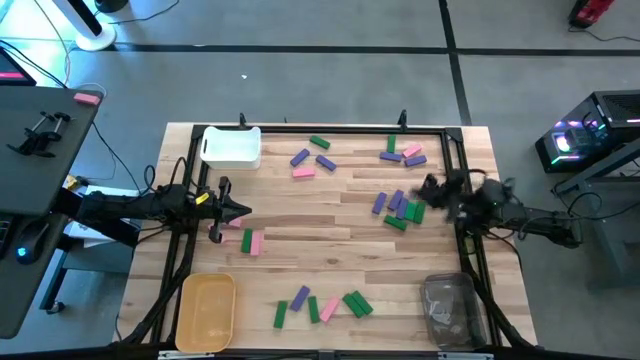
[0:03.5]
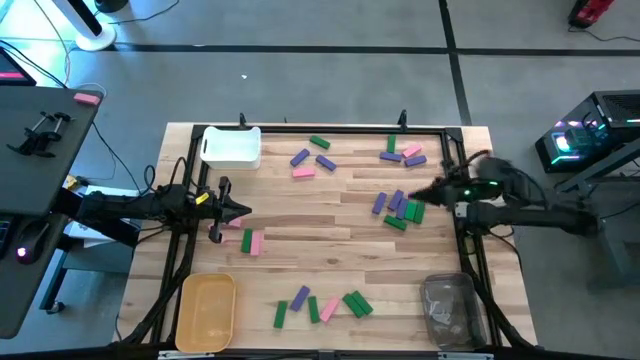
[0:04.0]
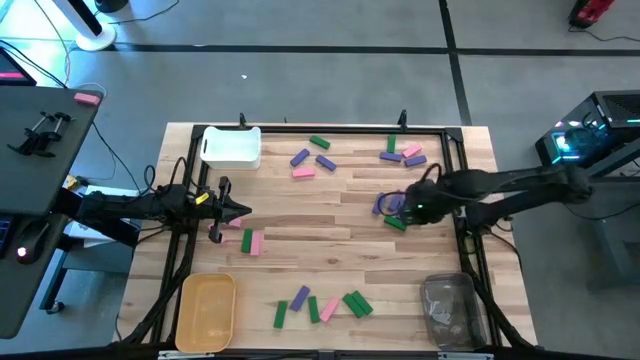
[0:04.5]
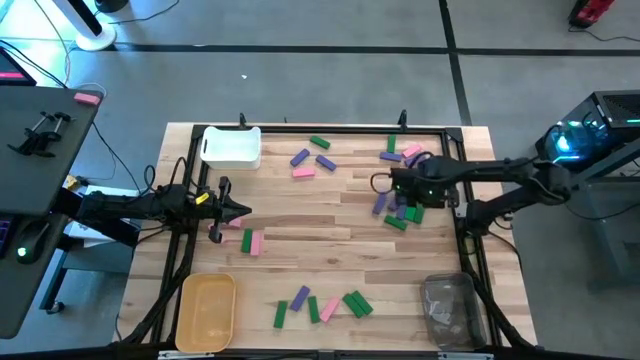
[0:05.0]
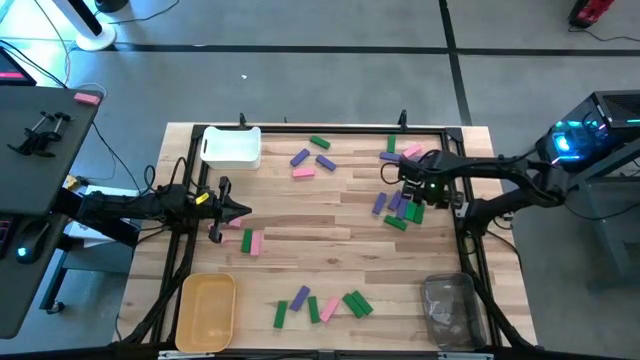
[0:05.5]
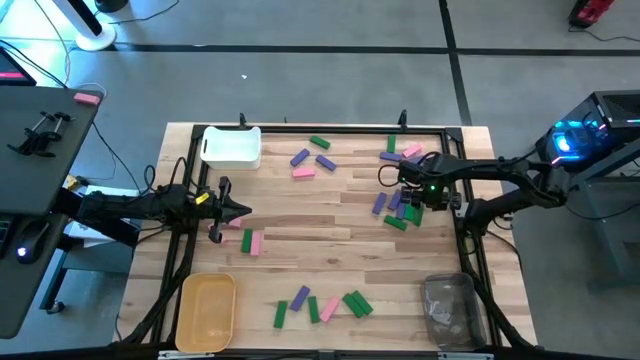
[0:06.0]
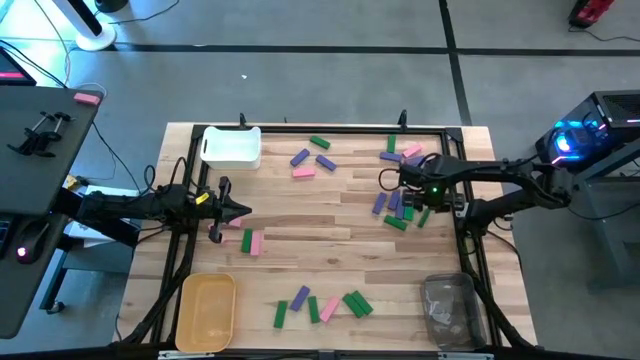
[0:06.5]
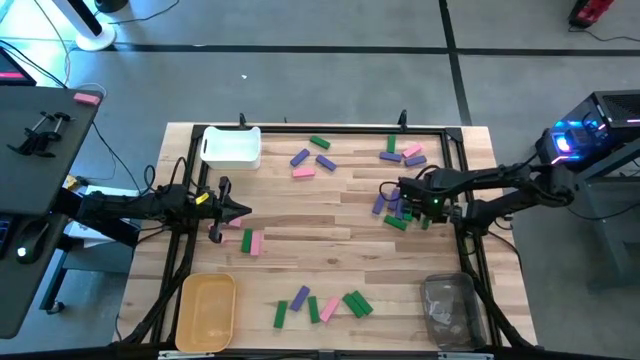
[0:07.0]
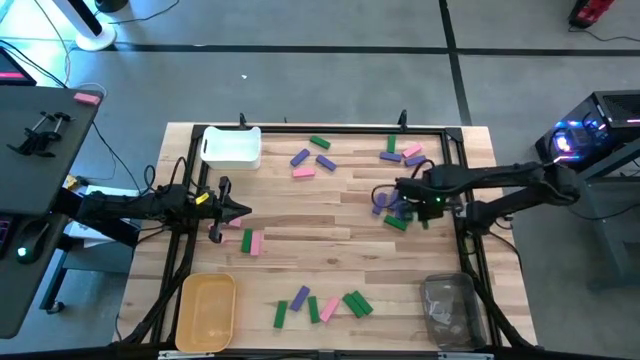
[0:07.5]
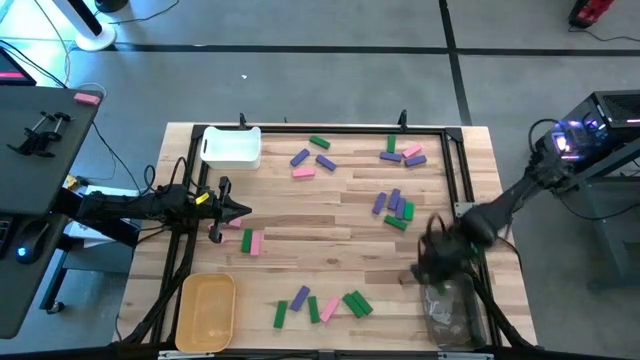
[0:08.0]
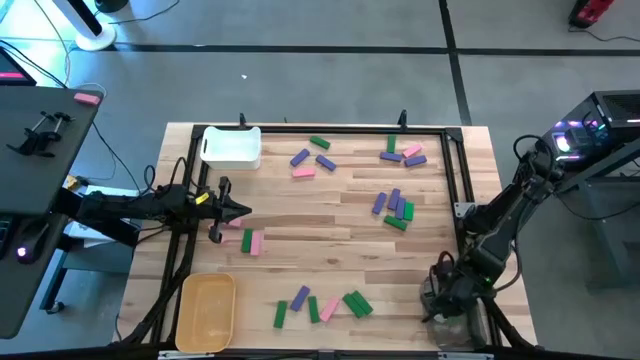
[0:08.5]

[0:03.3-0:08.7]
Task: Sort blocks
Put the green wooden block into the black bin

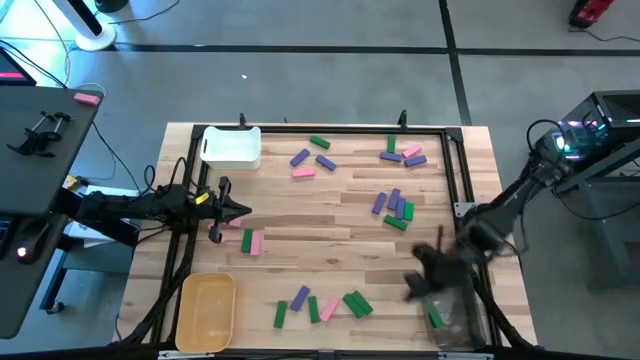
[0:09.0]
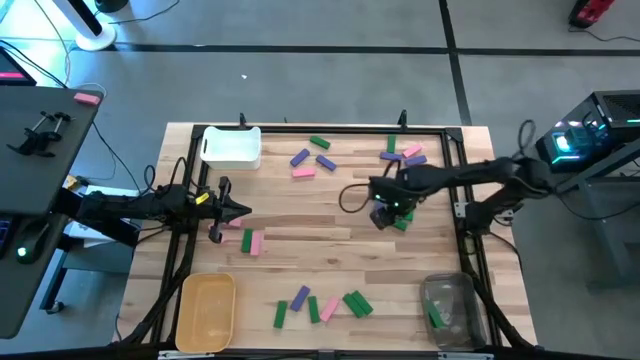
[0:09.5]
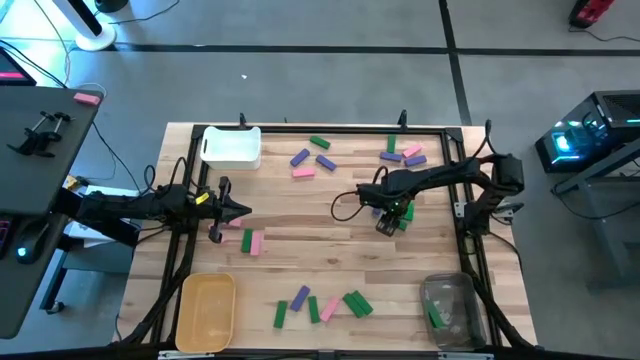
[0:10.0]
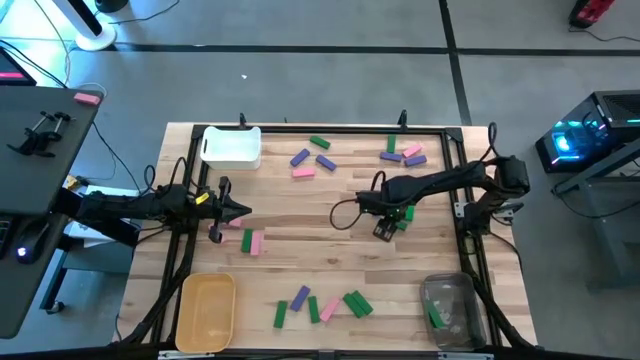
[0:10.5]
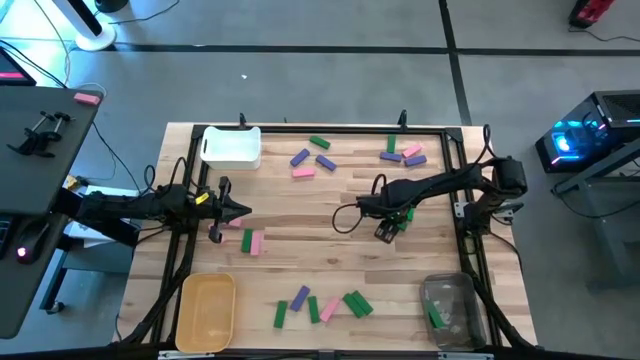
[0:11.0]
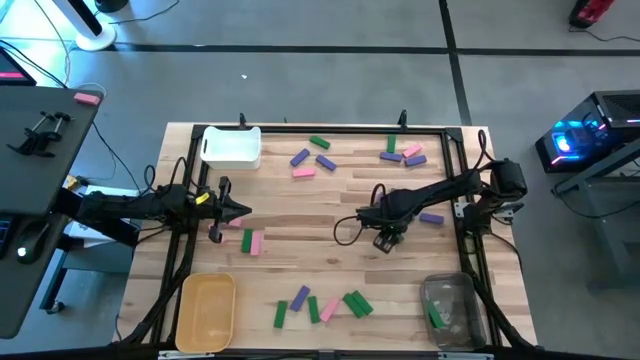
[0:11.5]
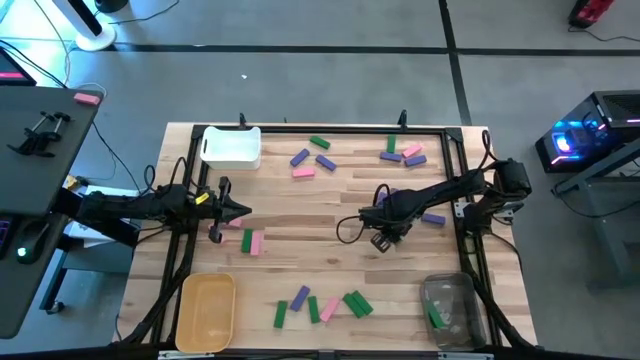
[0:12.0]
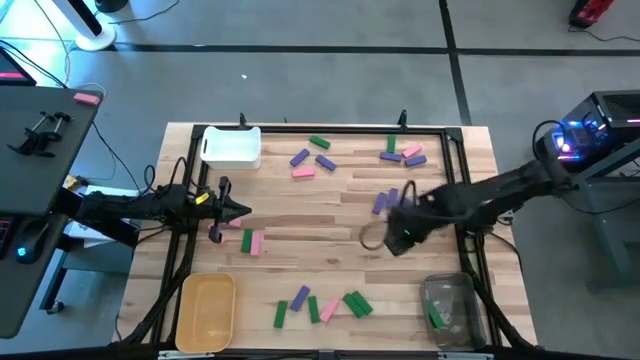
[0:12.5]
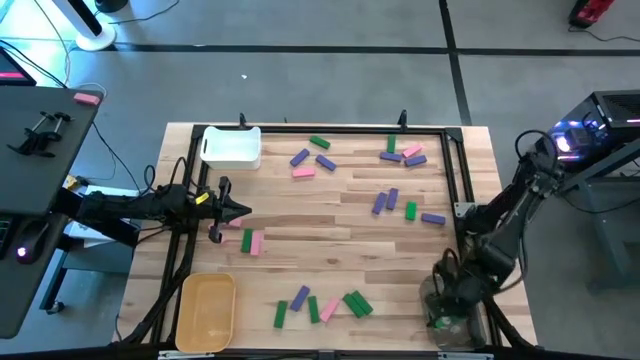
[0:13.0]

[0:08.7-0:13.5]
Put the green wooden block into the black bin

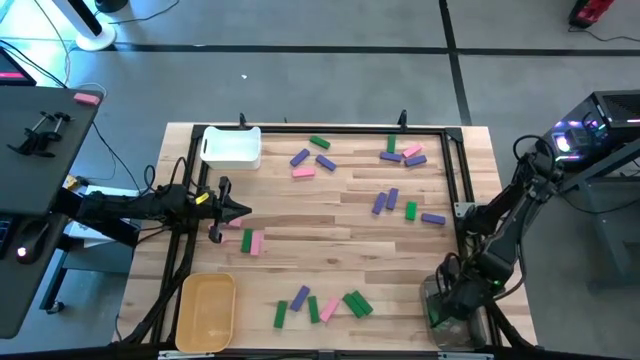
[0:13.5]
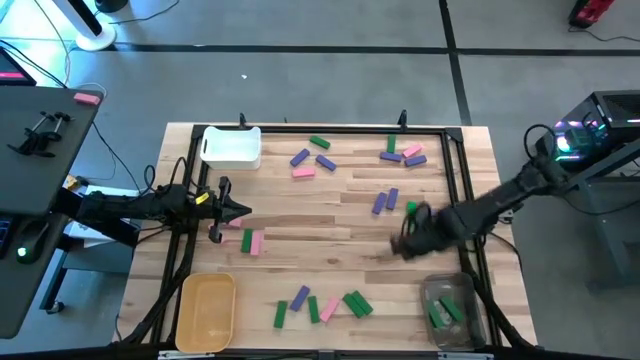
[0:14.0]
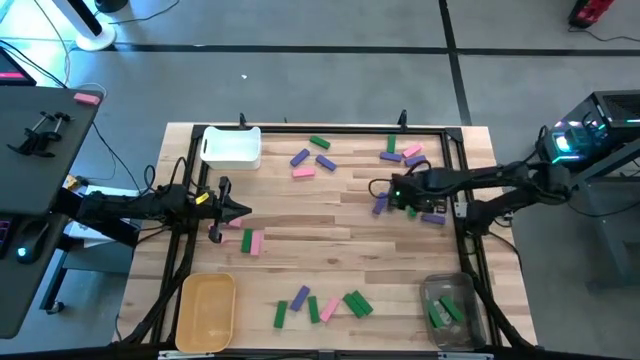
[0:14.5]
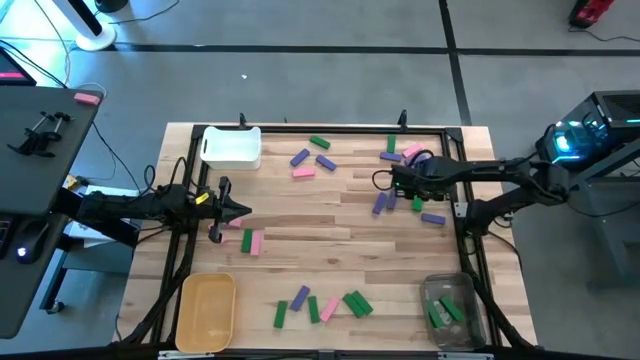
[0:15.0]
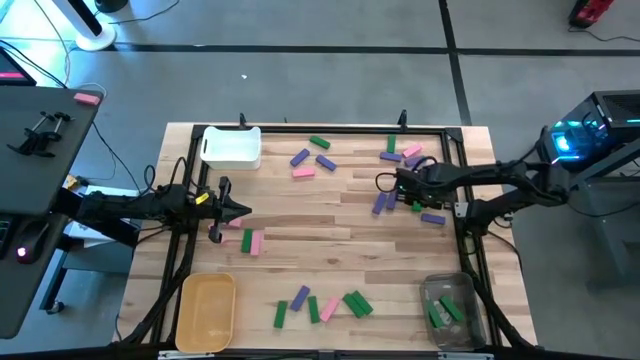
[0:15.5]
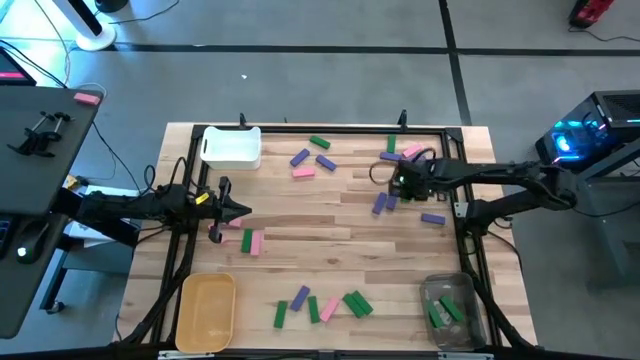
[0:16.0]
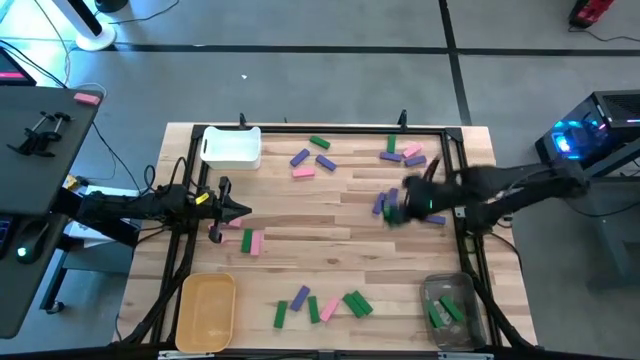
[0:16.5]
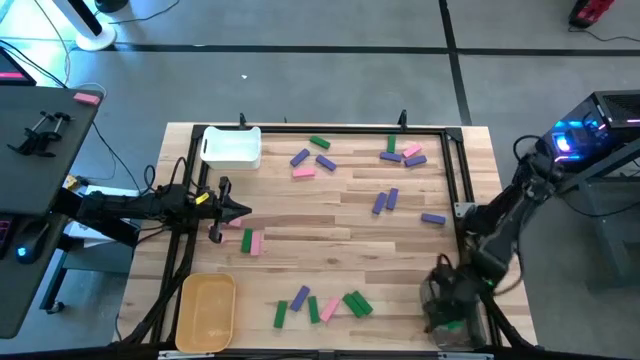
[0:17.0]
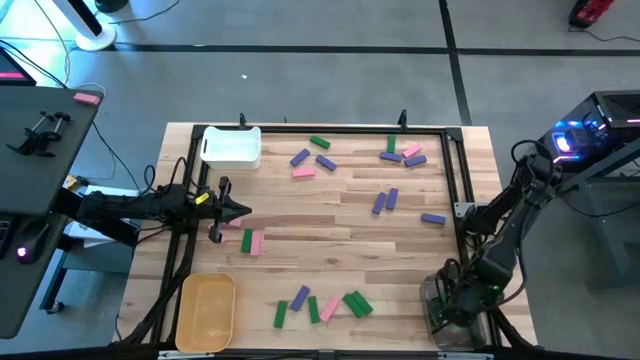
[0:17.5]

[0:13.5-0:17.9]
Put the green wooden block into the black bin

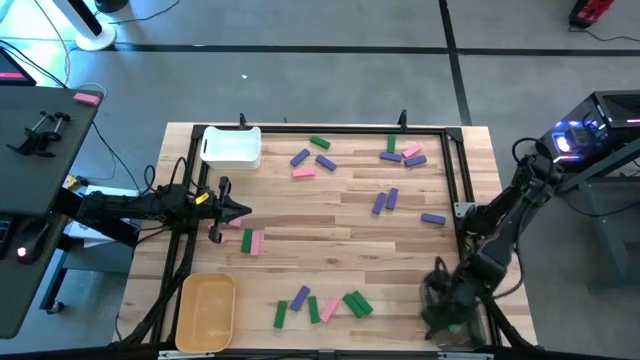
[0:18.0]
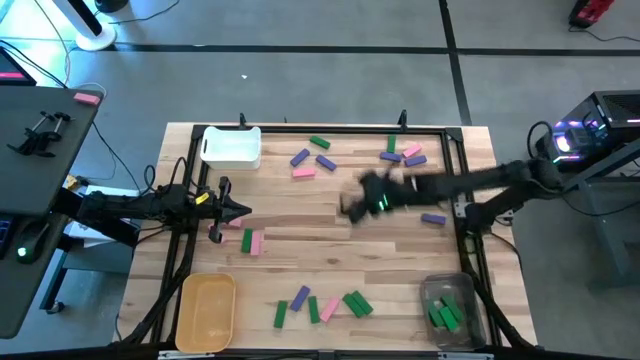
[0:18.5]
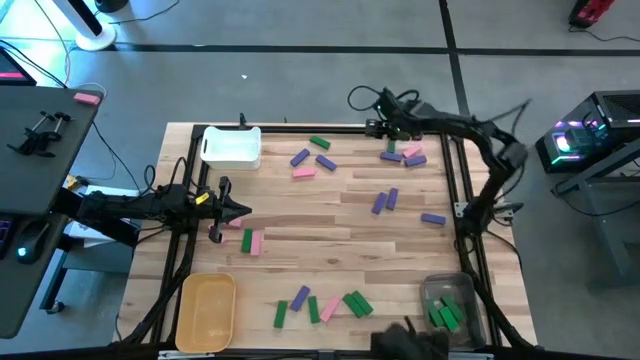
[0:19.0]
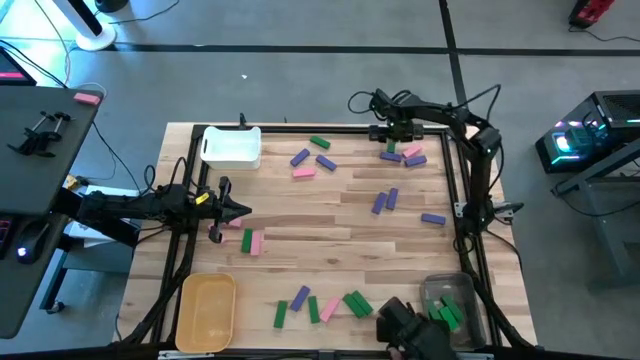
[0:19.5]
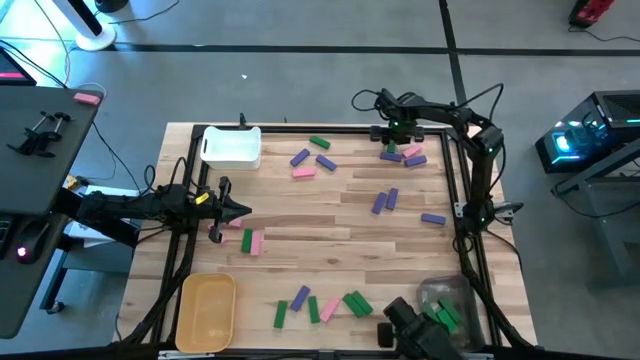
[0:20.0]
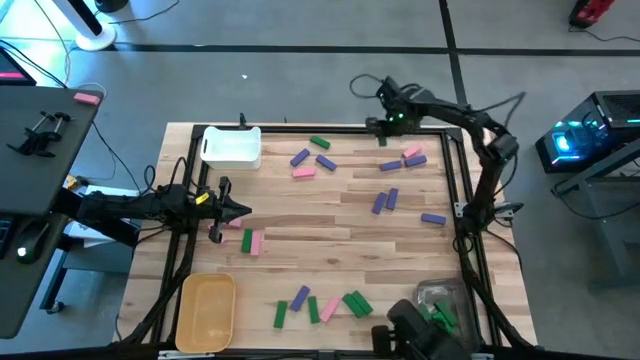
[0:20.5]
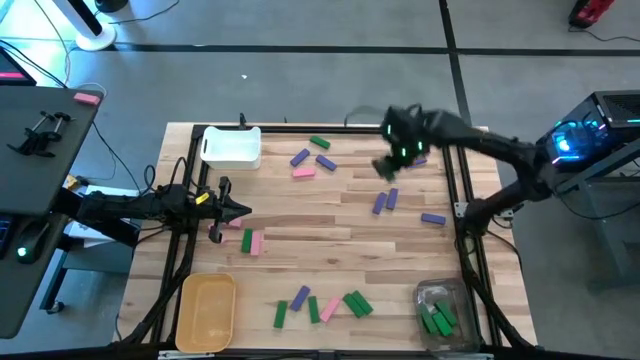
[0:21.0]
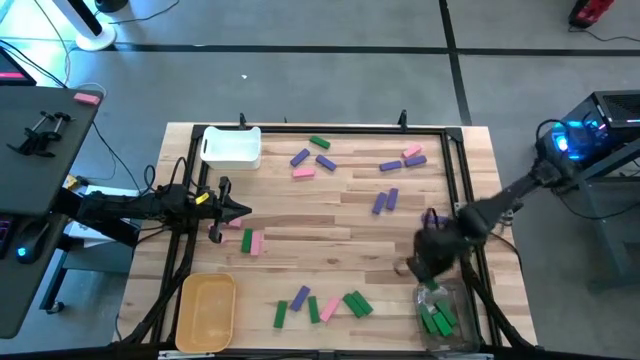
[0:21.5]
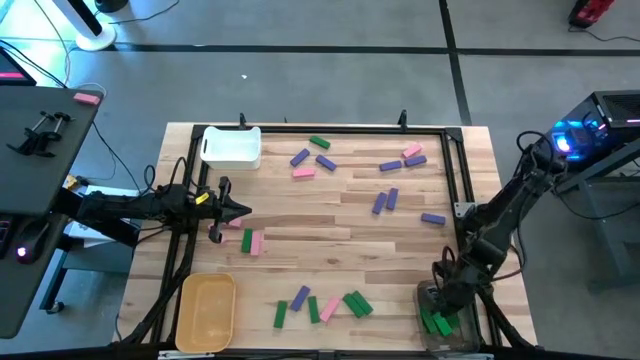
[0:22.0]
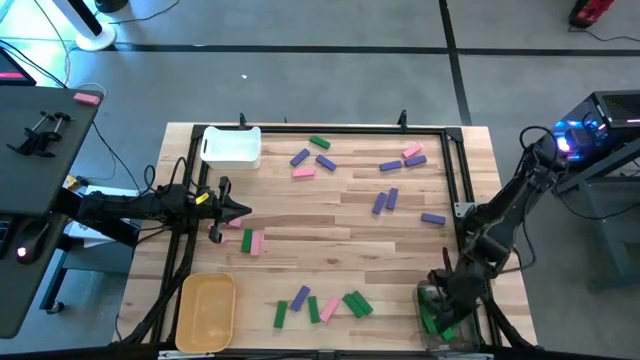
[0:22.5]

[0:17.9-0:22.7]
Put the green wooden block into the black bin
